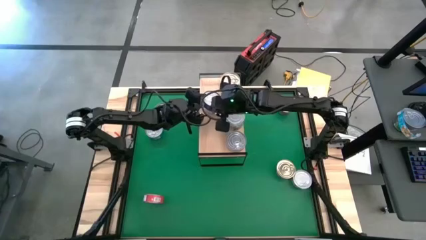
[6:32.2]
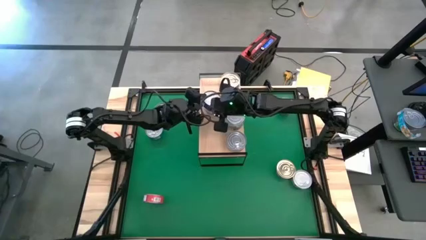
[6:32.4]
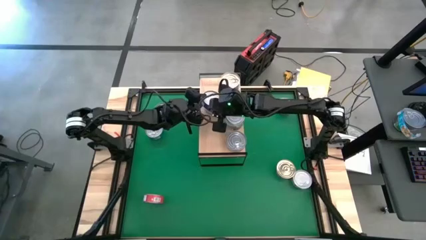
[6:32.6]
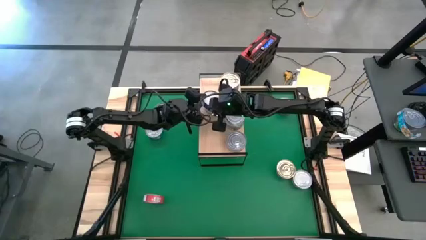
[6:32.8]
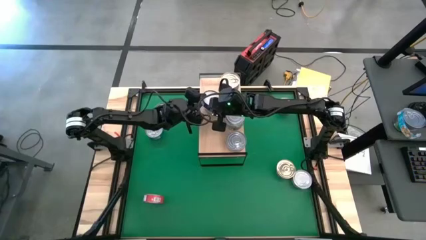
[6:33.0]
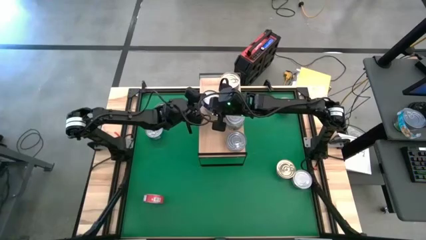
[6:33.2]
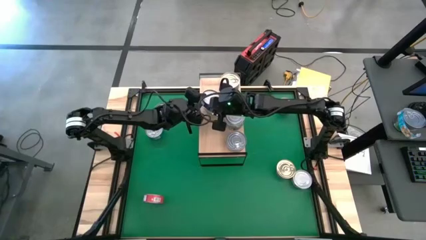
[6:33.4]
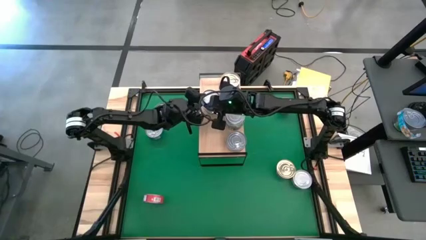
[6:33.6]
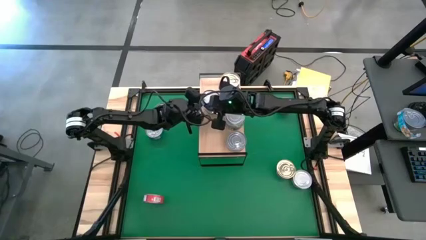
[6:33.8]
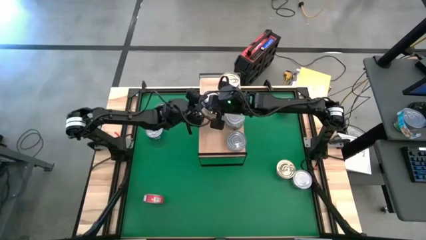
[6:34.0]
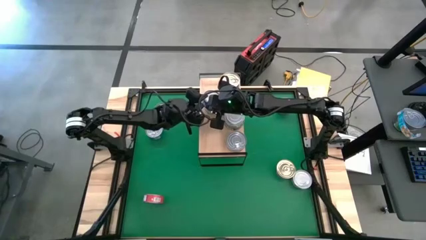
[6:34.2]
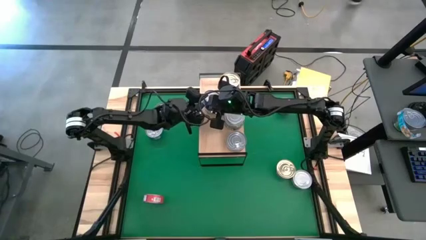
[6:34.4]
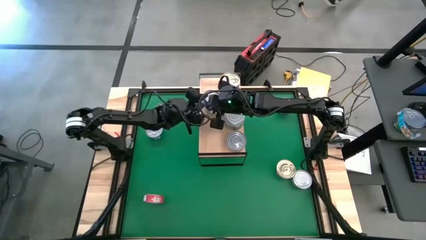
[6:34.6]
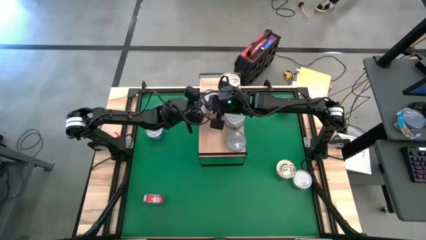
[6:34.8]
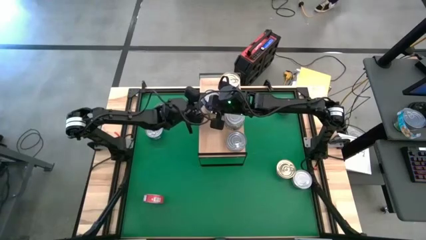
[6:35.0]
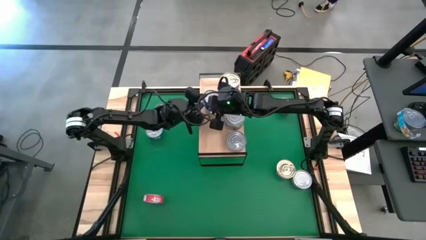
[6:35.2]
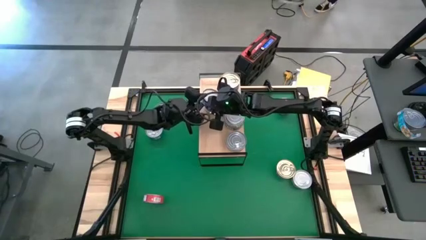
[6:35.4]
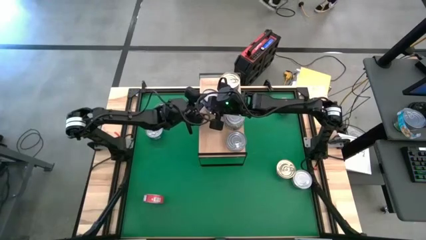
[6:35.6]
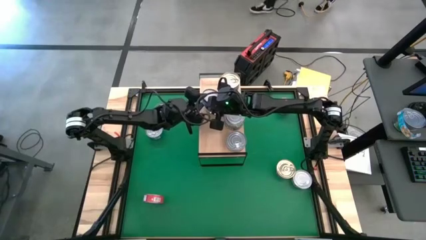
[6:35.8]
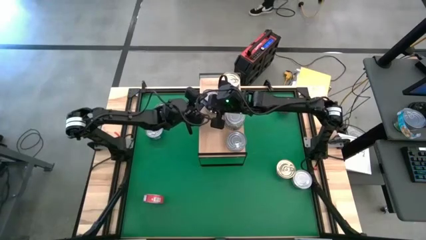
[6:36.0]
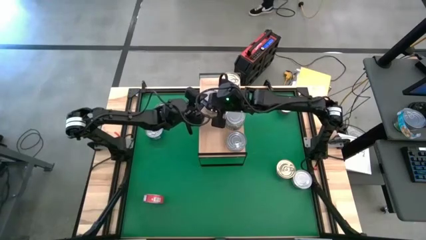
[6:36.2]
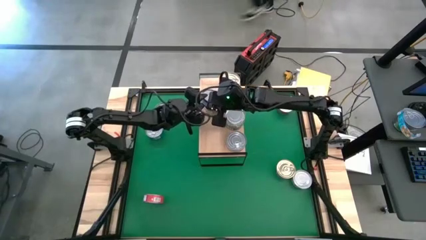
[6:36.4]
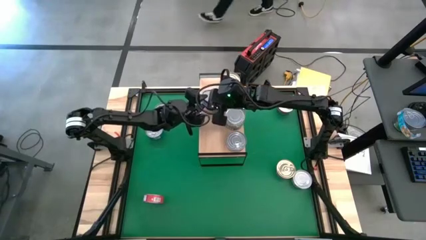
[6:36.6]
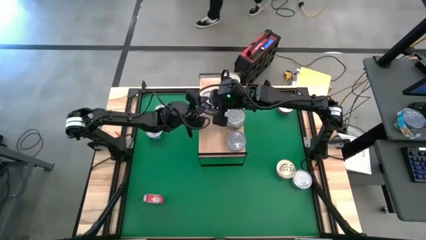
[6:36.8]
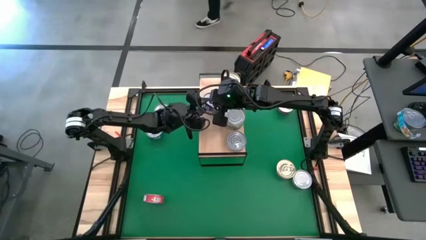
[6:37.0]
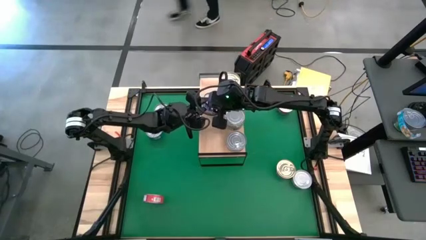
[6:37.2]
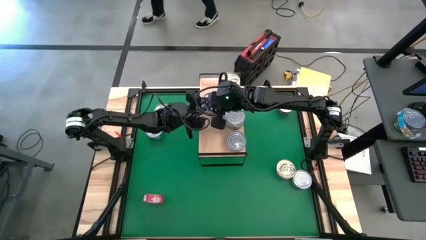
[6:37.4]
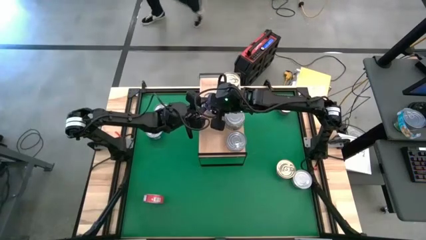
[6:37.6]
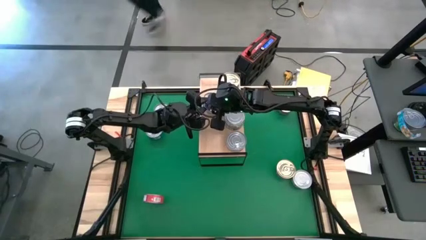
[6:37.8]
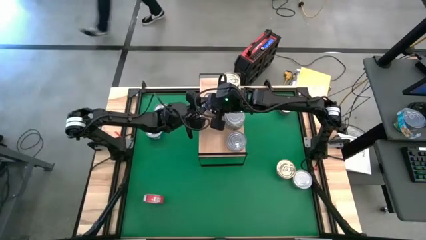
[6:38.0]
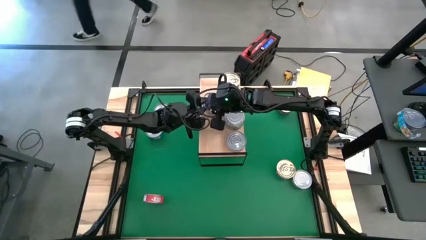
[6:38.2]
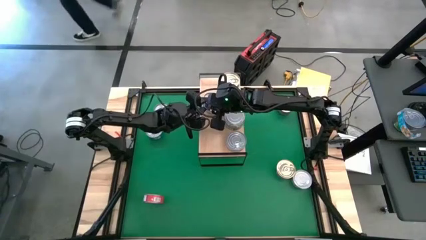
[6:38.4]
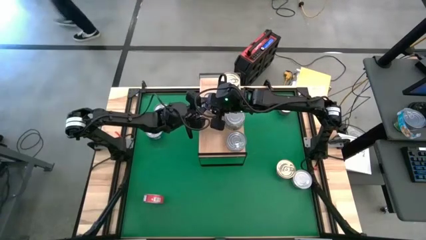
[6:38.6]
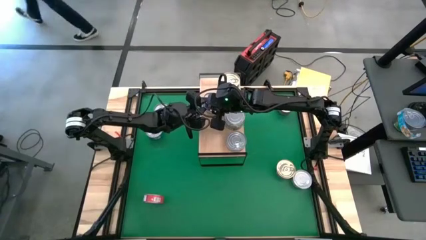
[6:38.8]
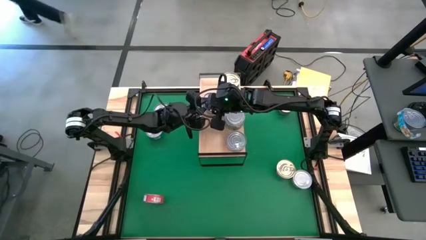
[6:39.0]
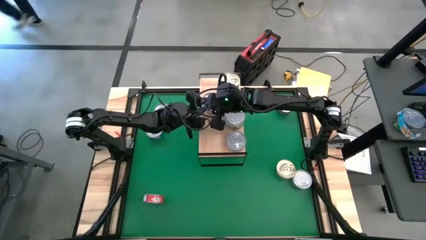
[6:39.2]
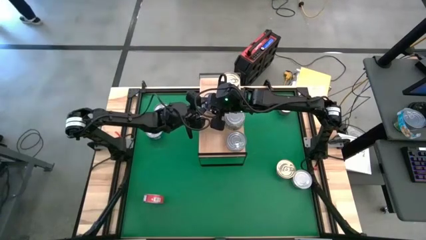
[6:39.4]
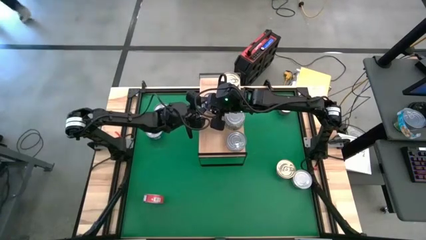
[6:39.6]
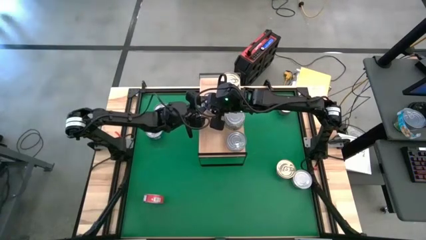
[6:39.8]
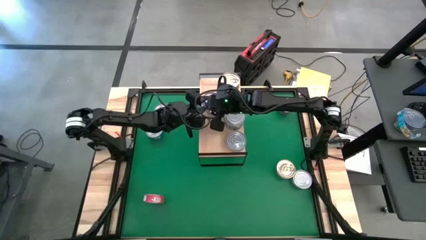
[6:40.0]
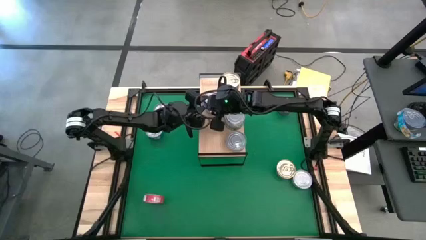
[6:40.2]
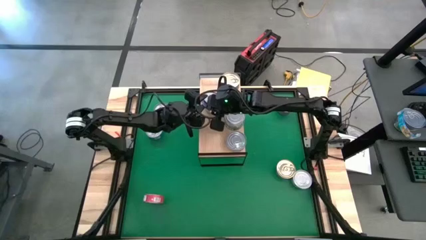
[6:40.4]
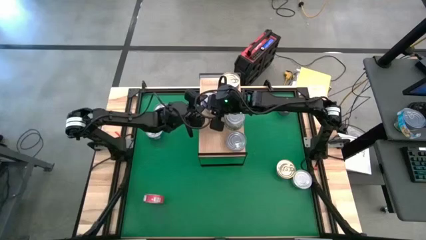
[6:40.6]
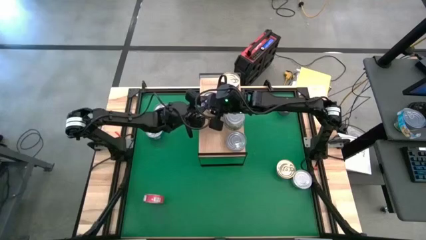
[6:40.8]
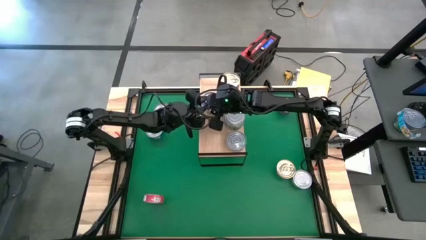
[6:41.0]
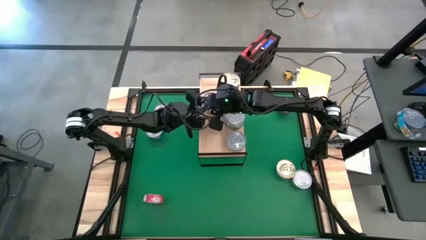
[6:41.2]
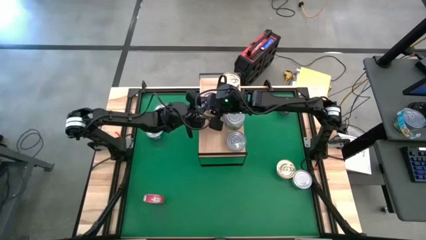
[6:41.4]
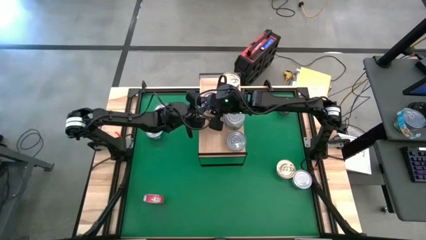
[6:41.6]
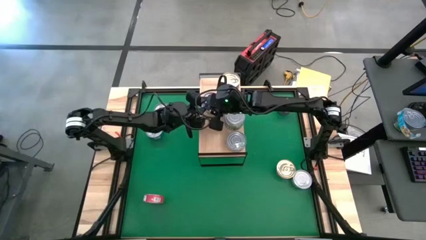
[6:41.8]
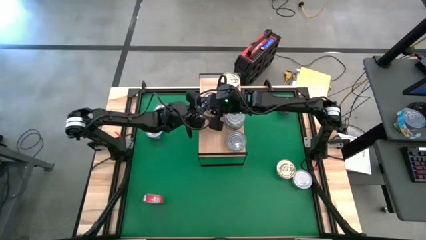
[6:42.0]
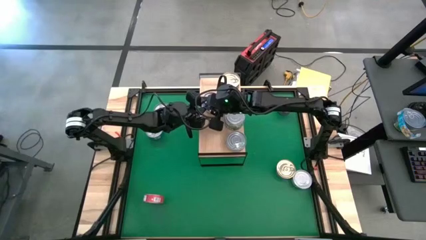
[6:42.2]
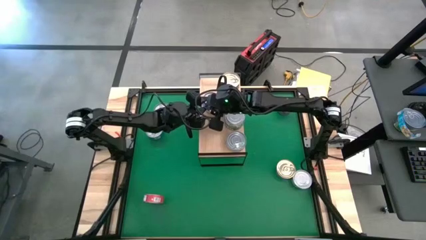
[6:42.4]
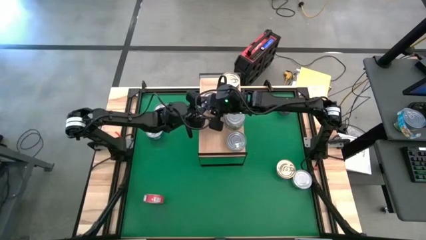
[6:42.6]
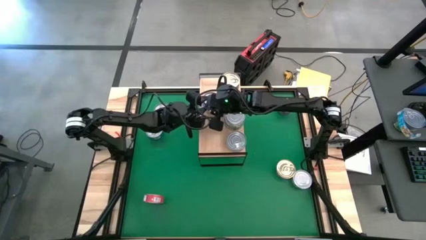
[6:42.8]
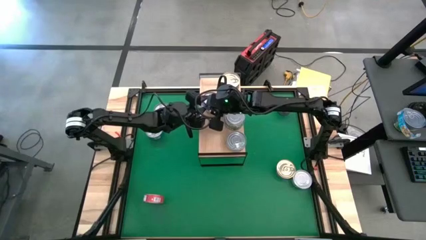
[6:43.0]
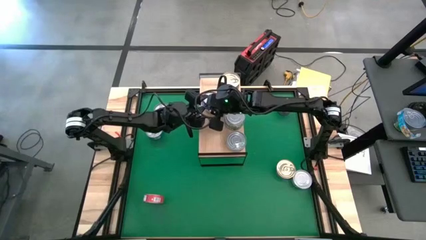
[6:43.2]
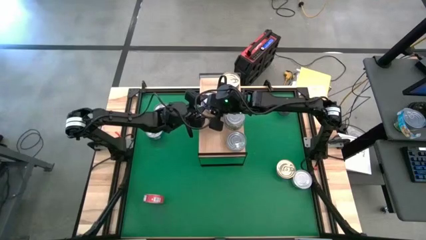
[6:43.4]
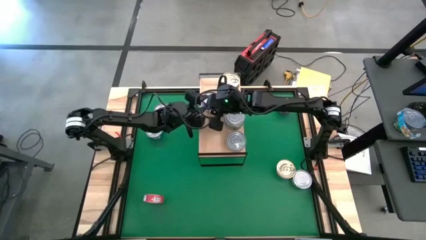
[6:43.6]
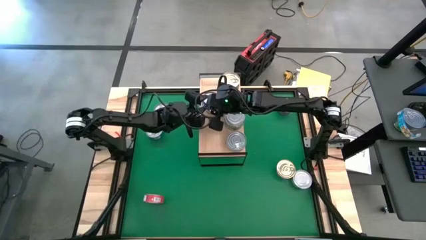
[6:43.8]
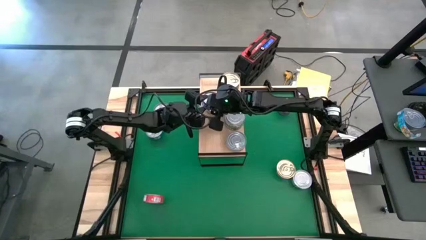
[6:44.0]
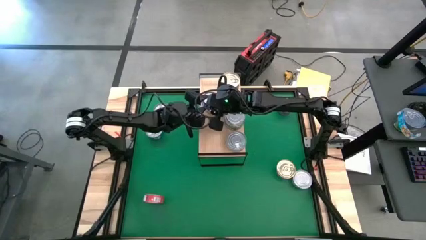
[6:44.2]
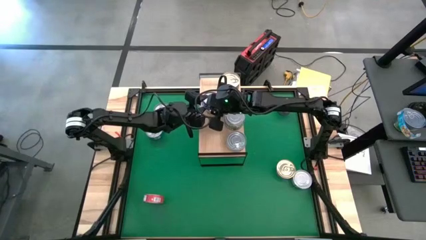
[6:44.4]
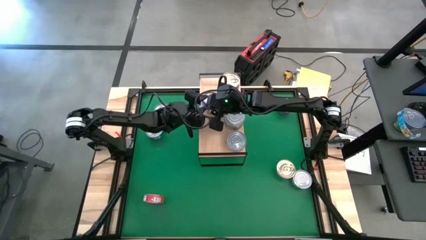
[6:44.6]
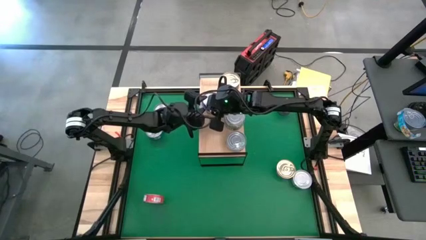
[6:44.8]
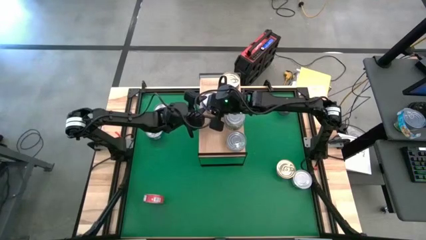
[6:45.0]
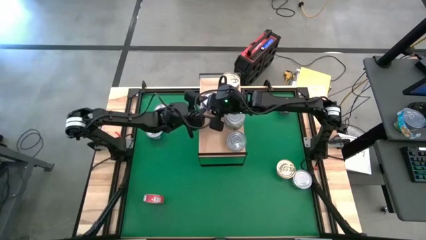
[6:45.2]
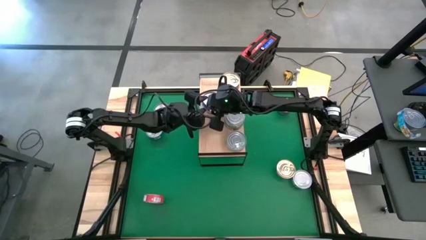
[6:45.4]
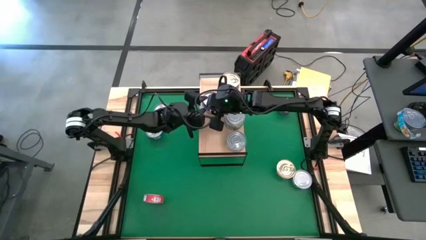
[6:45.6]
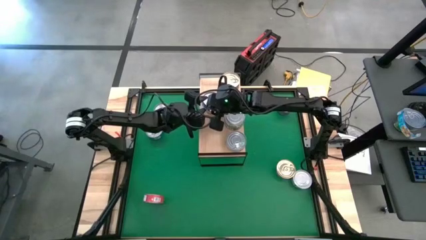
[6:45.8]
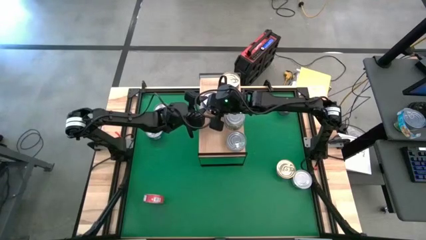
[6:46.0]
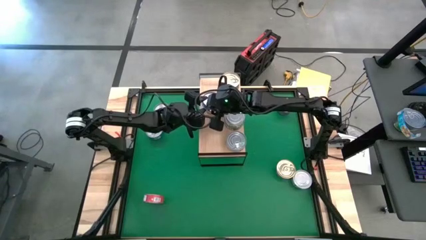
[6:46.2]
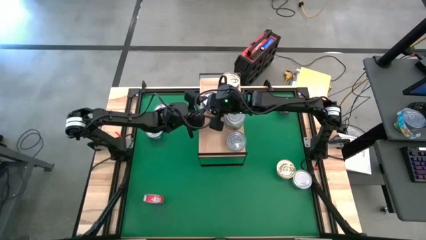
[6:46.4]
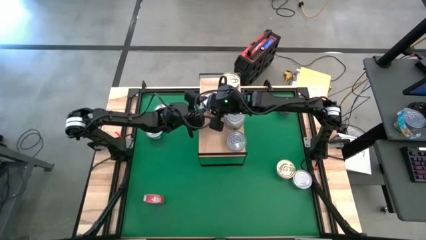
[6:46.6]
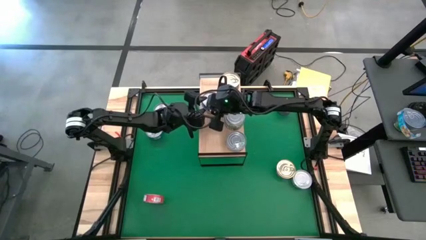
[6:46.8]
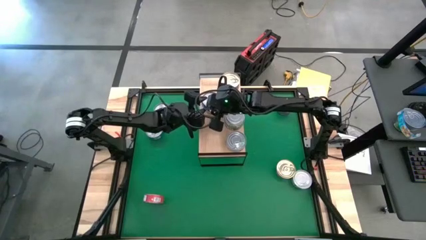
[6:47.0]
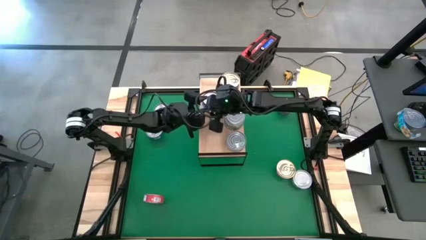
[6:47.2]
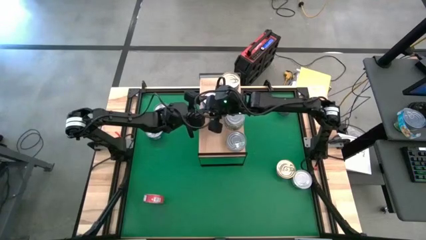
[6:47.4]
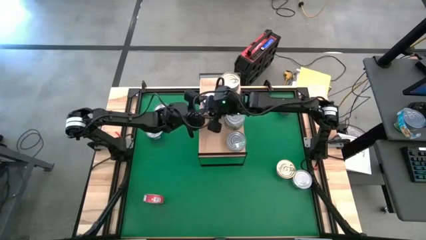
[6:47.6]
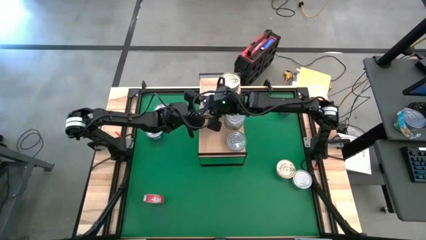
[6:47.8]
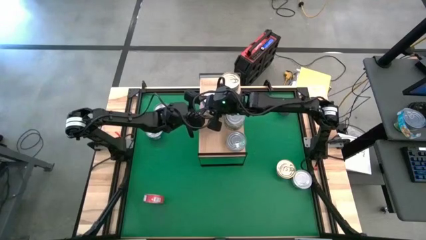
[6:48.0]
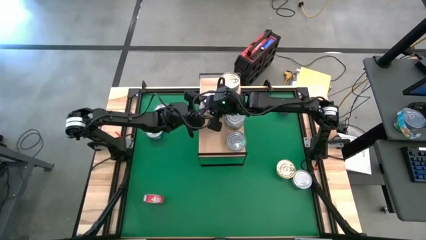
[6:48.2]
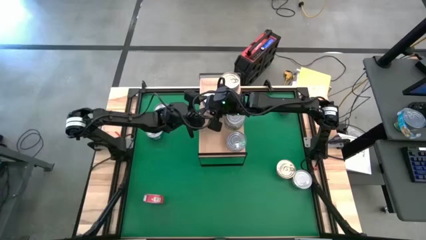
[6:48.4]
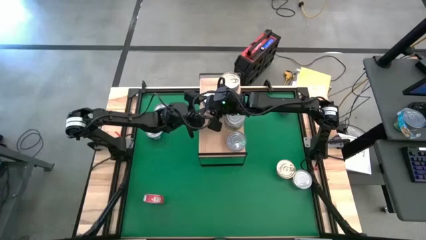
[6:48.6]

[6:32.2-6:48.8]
Task: Stack canned seafood by type on shelf
Stack the blue tuna can on top of the blue tuna can on the shelf
